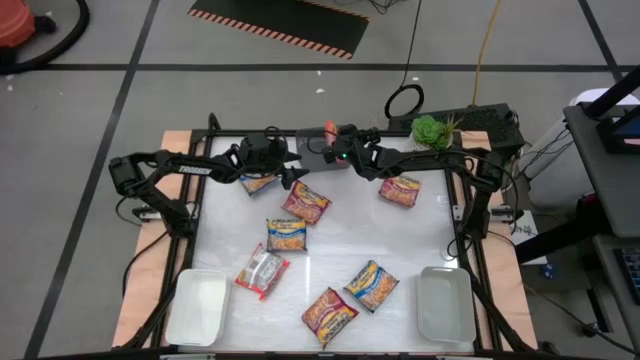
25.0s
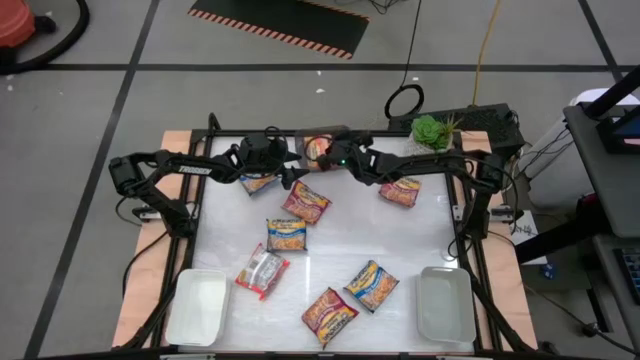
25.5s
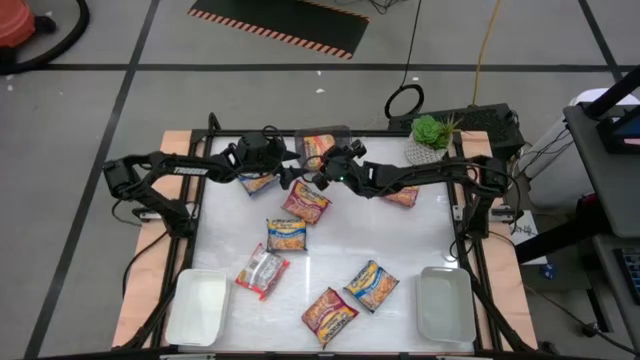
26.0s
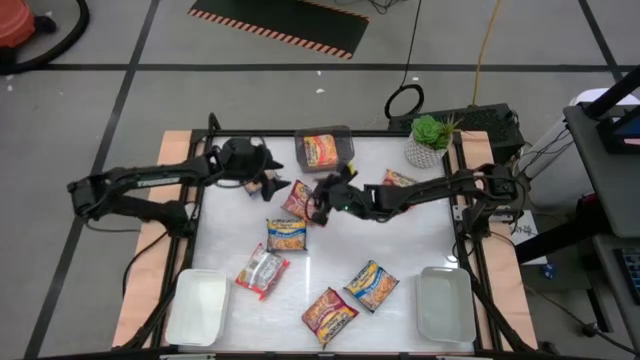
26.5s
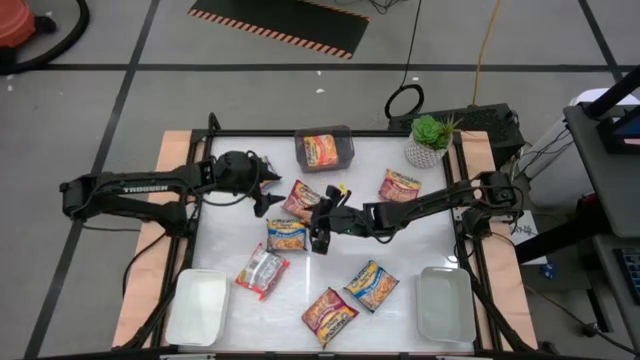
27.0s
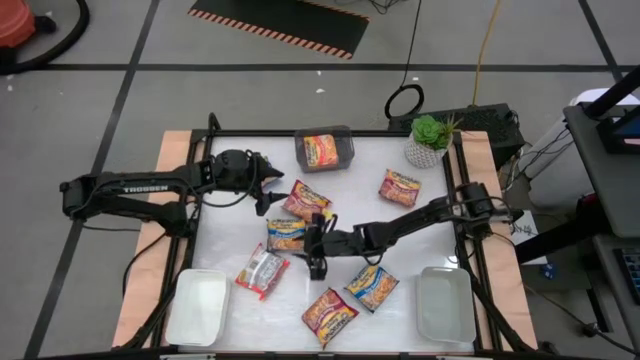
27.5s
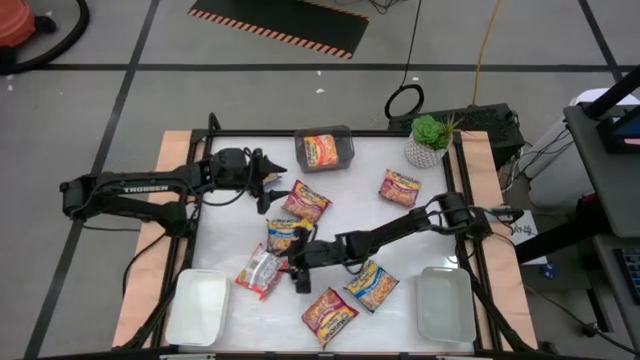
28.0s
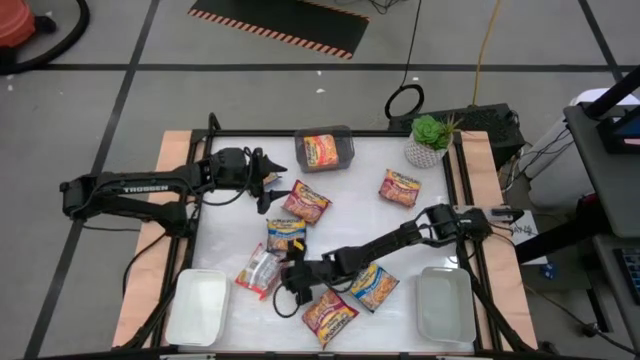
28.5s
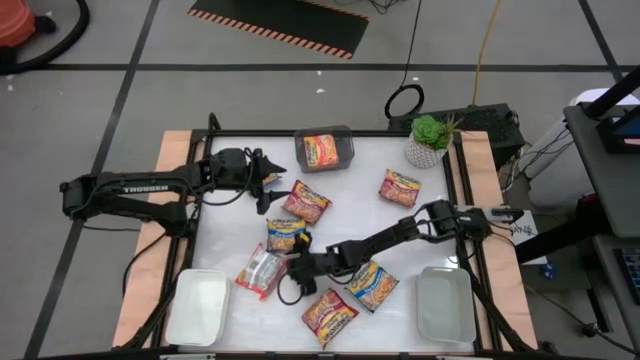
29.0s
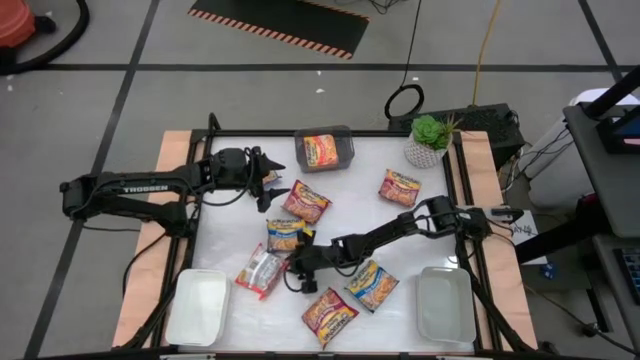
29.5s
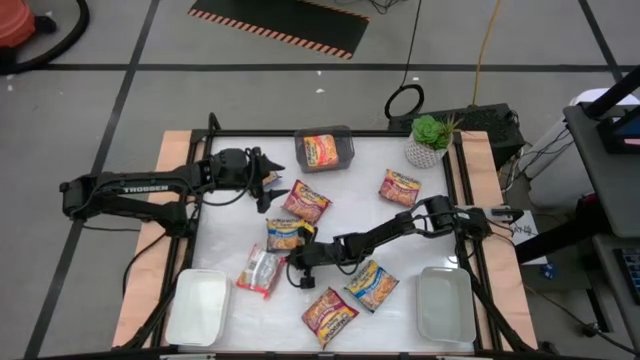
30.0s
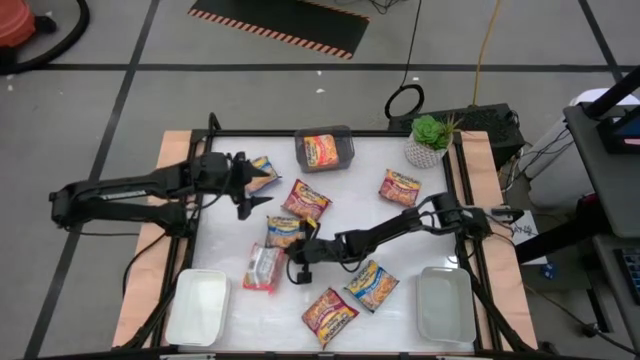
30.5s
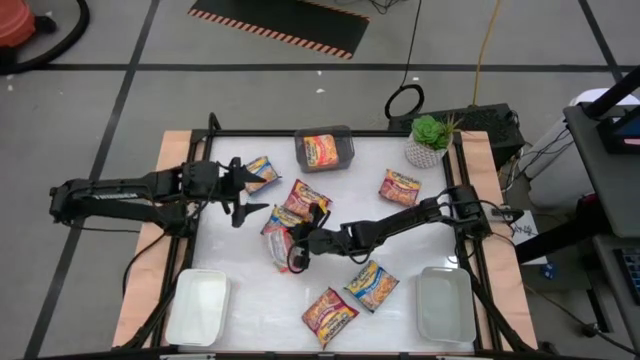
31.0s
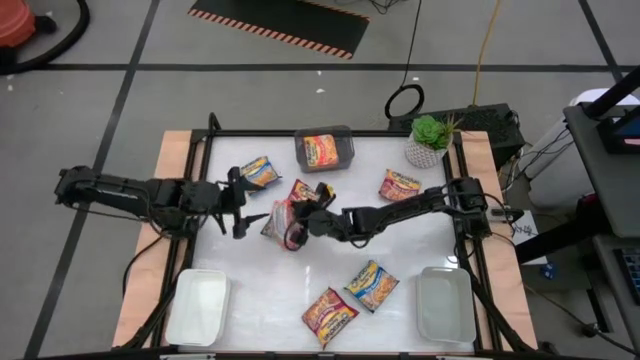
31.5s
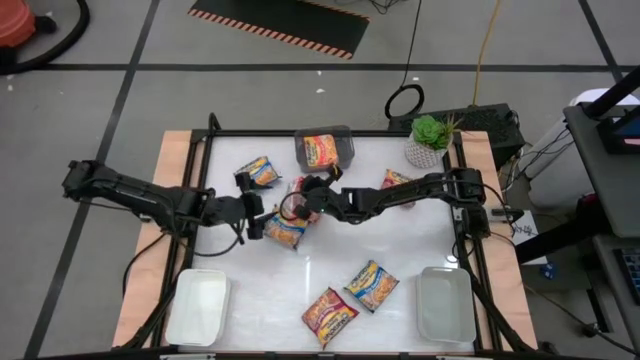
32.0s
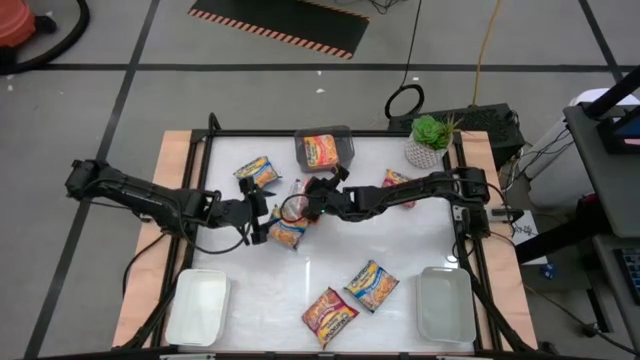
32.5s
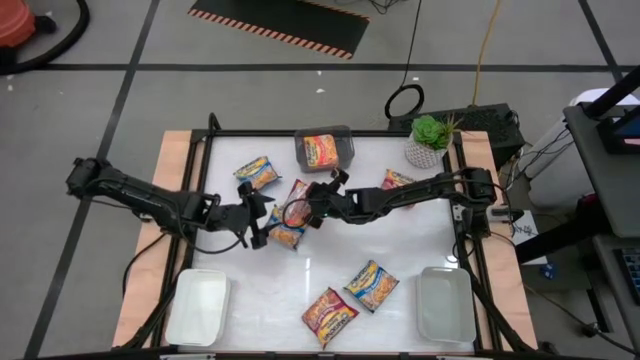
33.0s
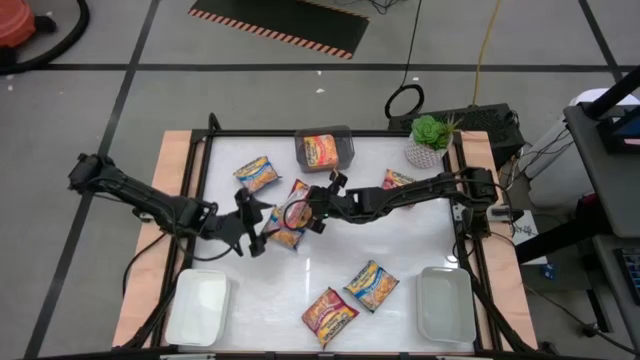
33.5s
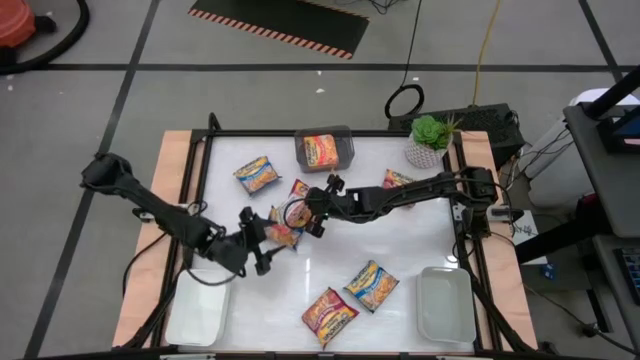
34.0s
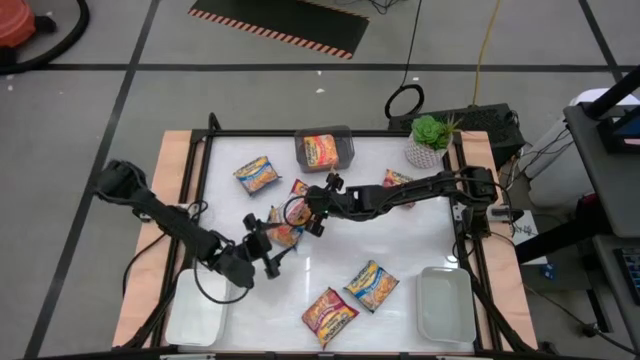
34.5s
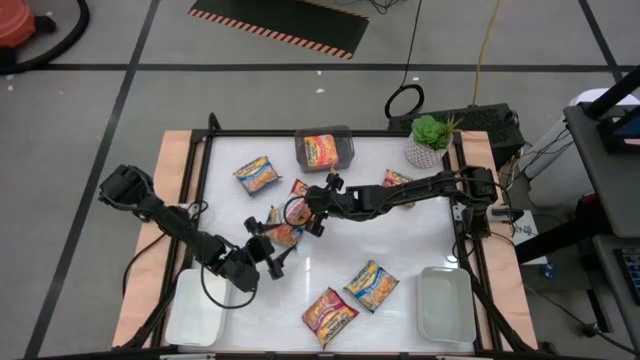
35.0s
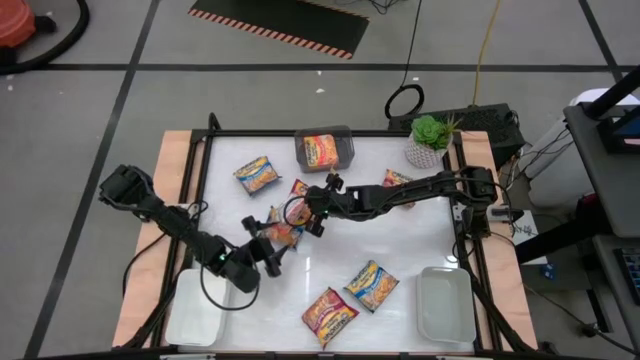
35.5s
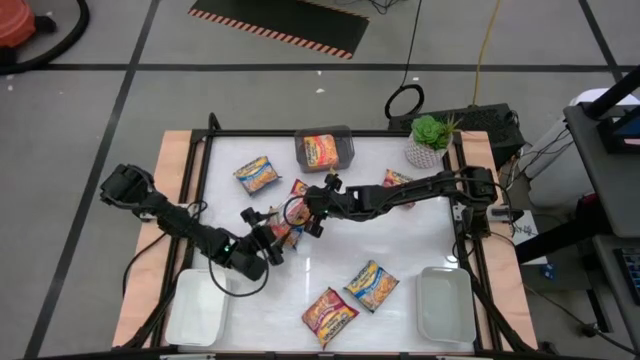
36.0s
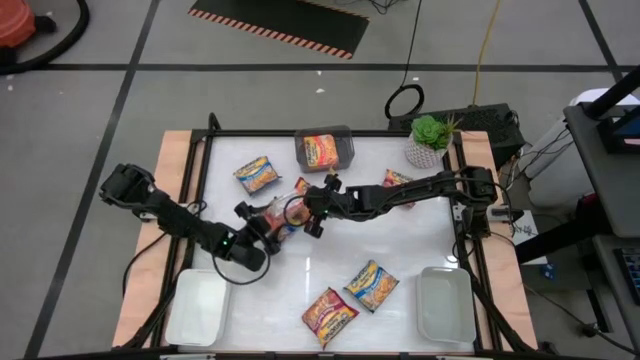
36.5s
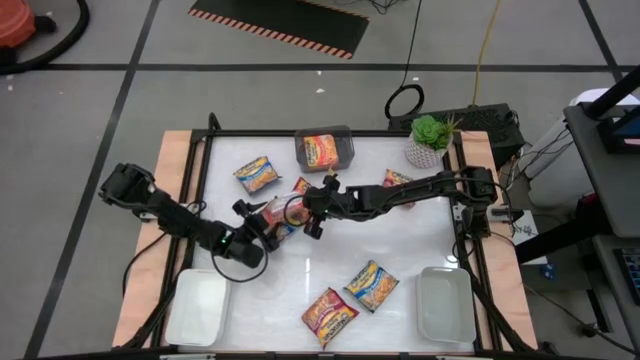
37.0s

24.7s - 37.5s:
Task: Sort Maruchan noodles
Put the orange noodle pack into the black bin

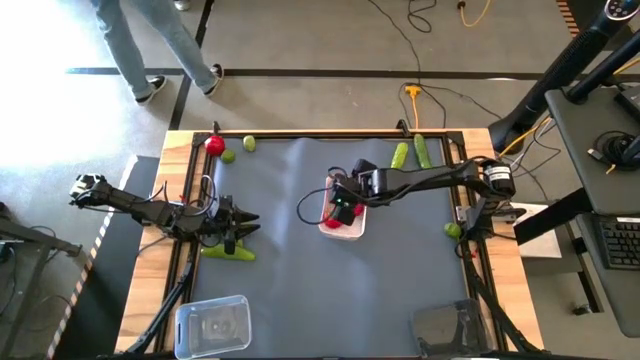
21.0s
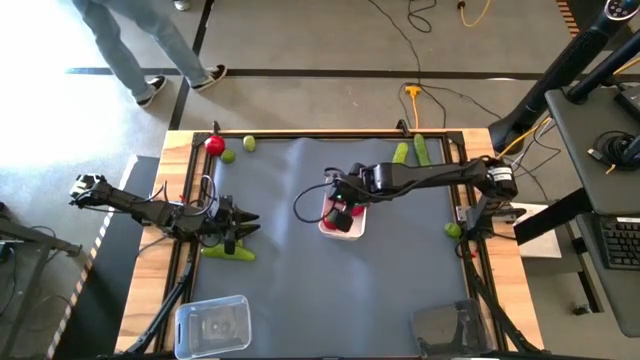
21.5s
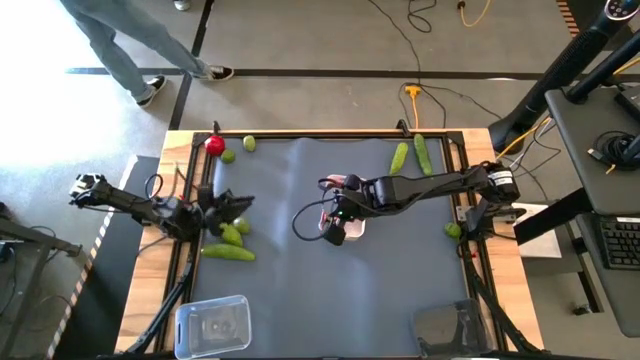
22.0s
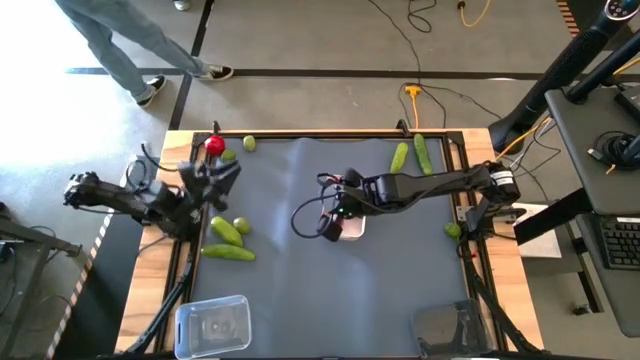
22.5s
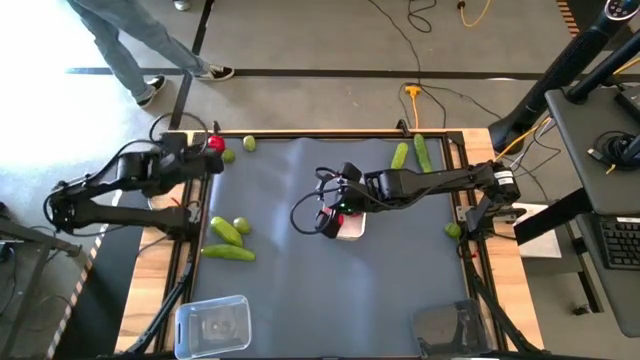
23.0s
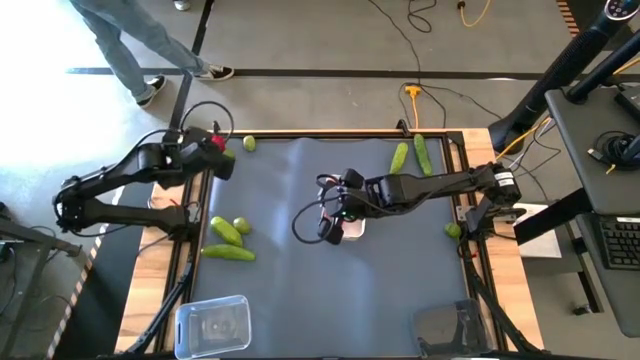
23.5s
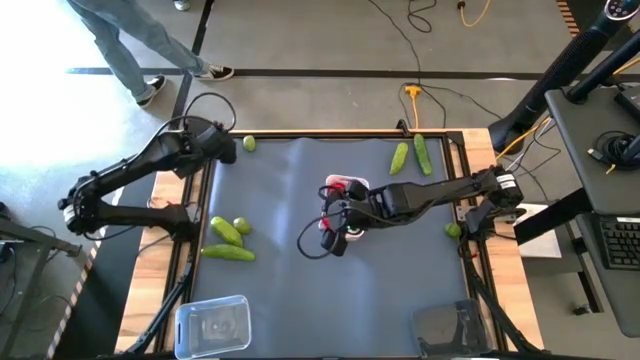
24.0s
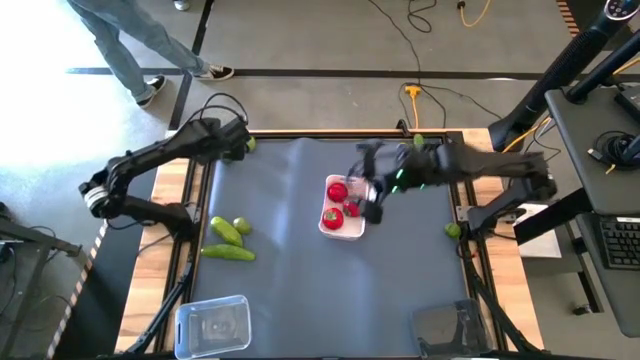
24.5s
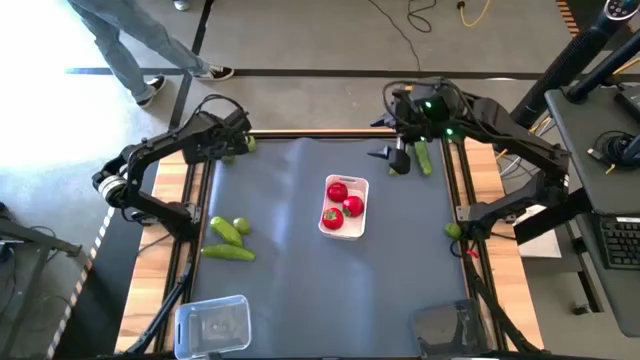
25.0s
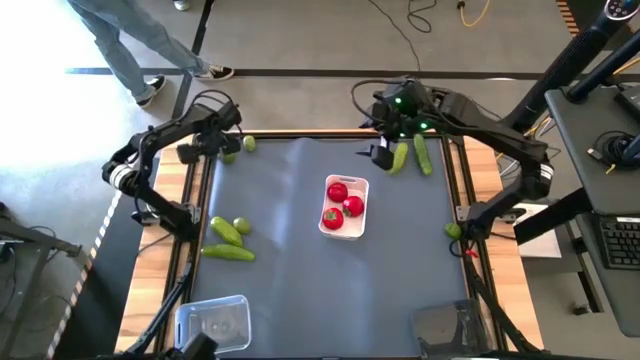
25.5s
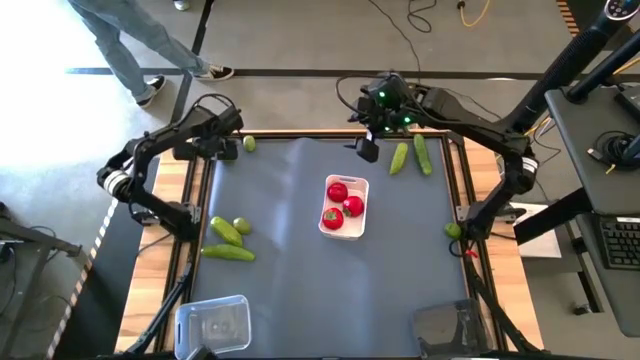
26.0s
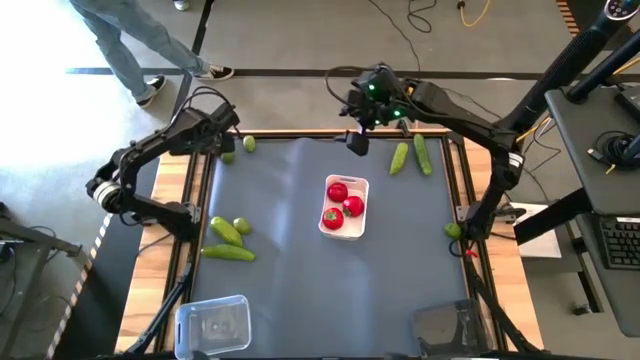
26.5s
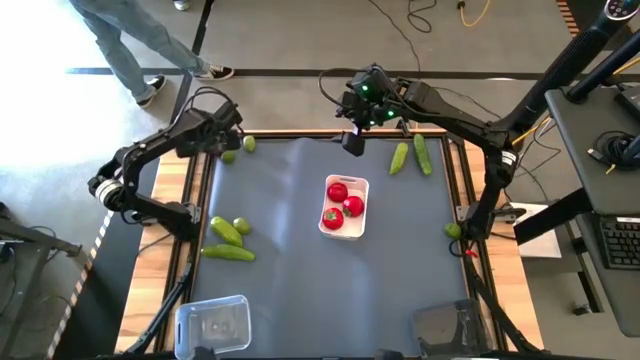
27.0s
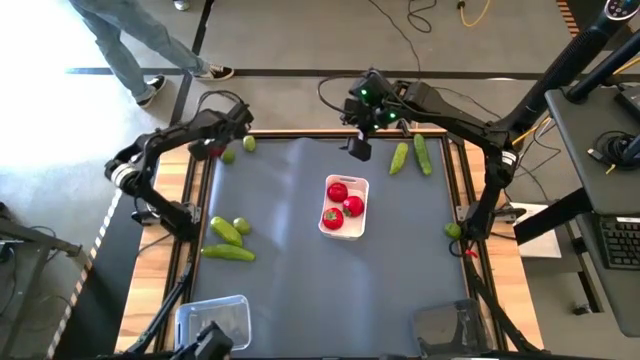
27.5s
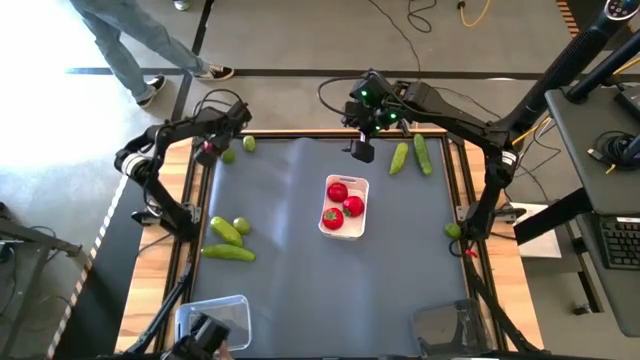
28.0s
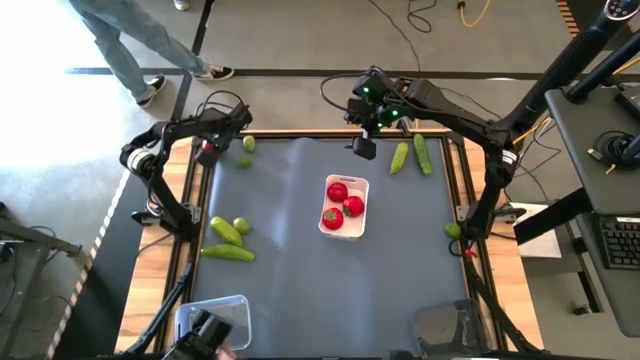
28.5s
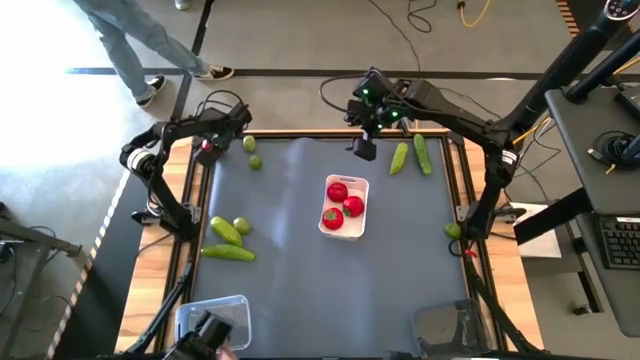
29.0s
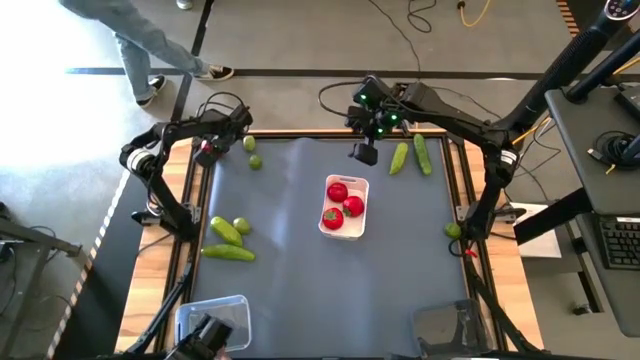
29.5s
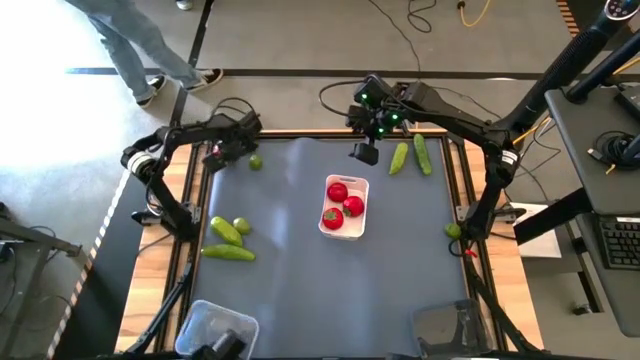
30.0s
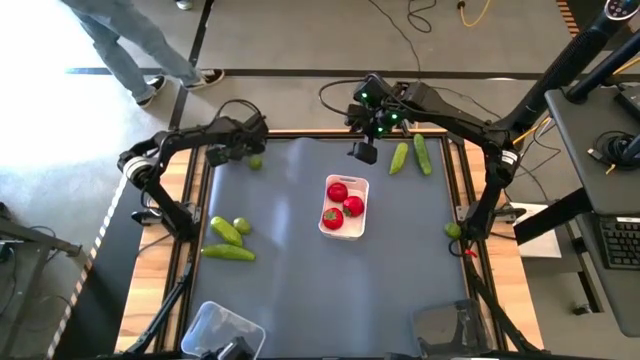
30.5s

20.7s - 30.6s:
Task: Sort produce into baskets
Put the tomato into the white bin
